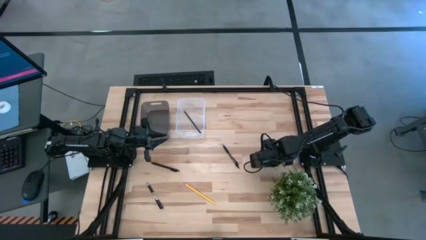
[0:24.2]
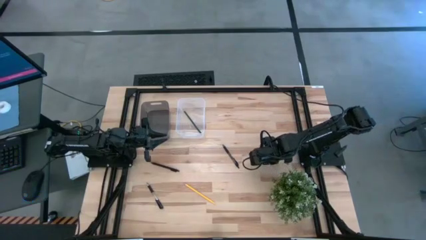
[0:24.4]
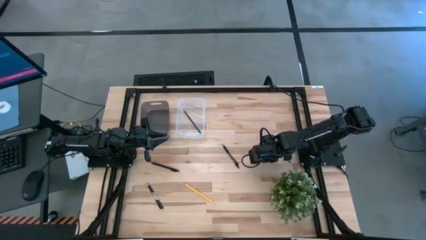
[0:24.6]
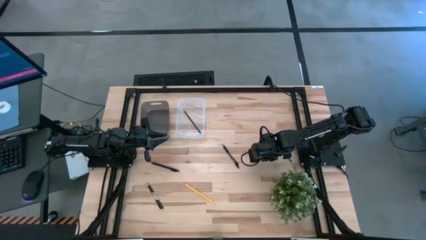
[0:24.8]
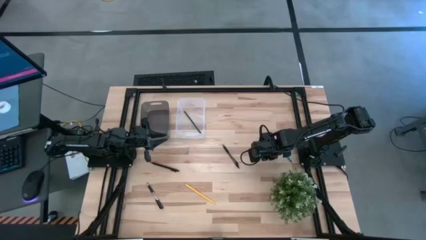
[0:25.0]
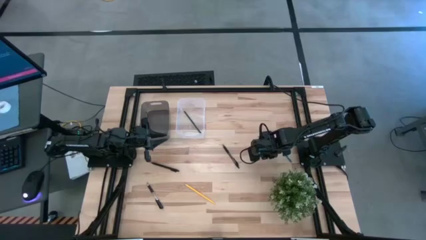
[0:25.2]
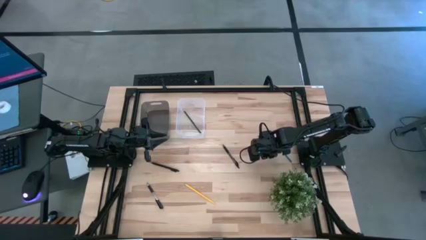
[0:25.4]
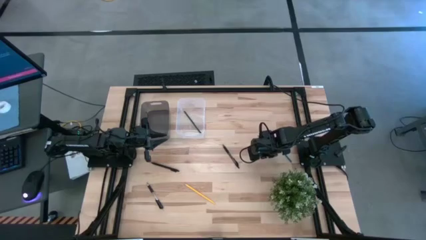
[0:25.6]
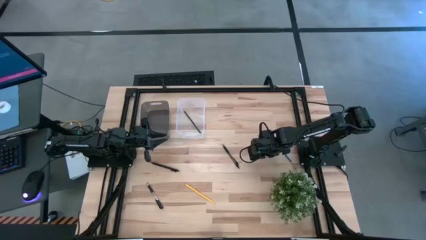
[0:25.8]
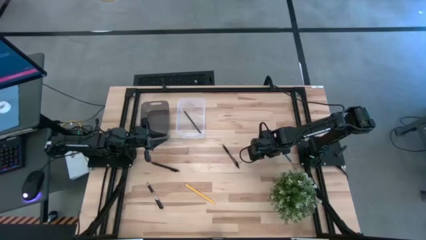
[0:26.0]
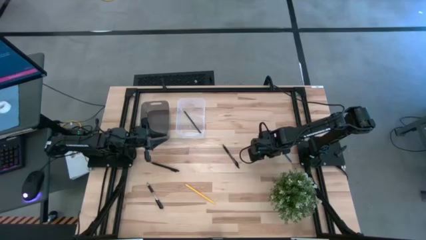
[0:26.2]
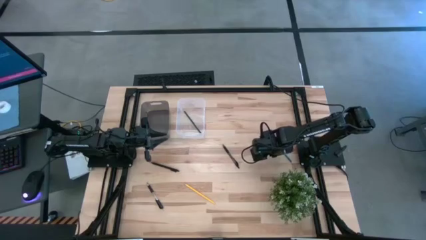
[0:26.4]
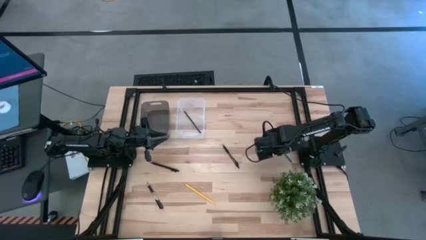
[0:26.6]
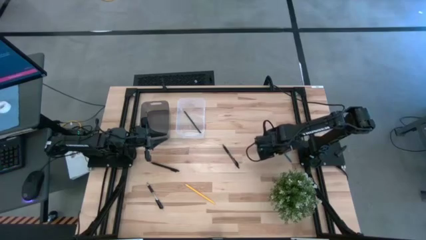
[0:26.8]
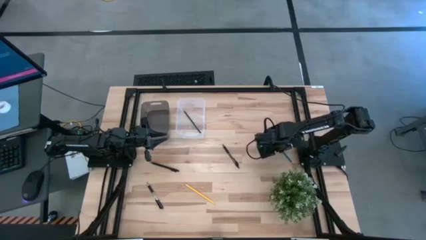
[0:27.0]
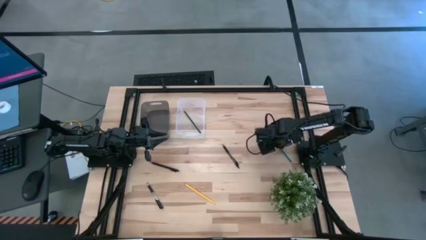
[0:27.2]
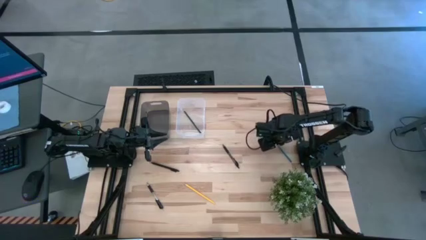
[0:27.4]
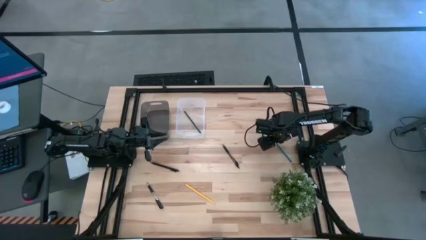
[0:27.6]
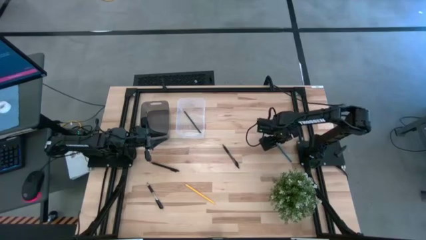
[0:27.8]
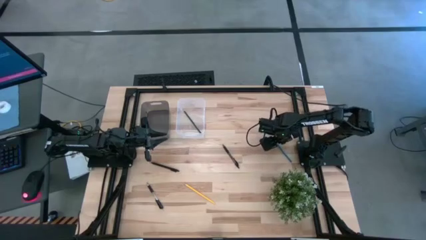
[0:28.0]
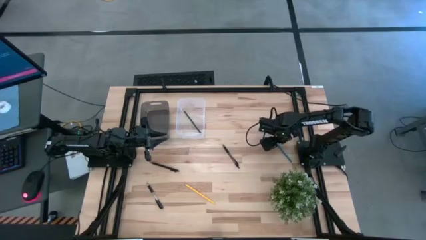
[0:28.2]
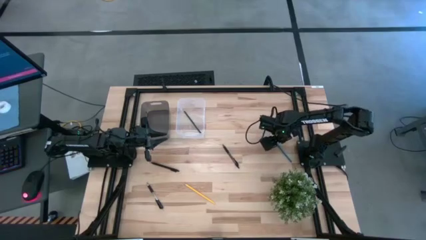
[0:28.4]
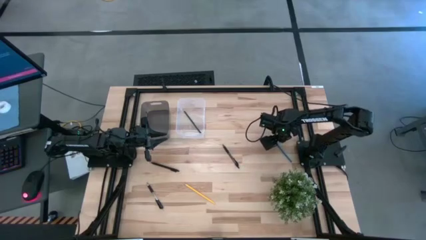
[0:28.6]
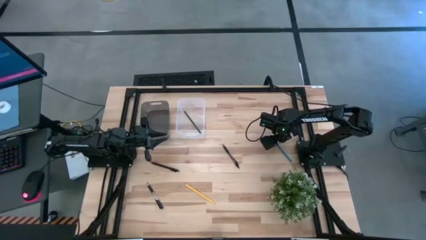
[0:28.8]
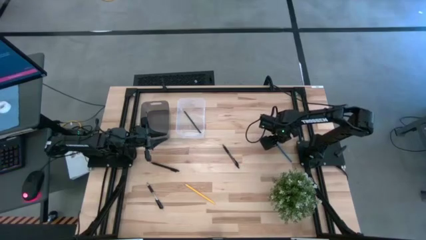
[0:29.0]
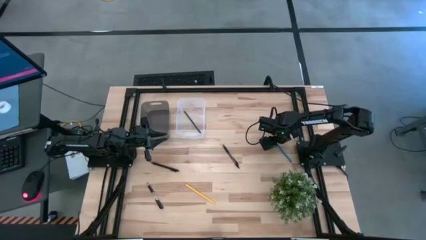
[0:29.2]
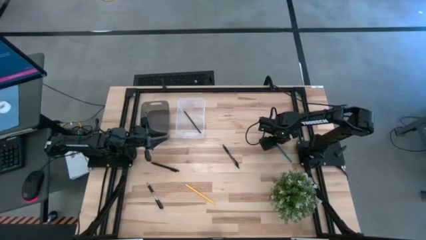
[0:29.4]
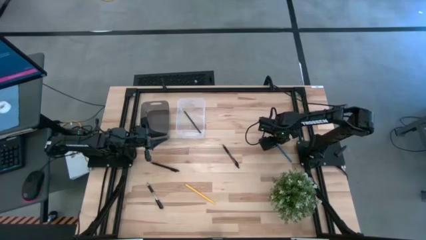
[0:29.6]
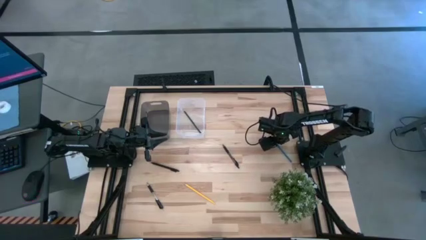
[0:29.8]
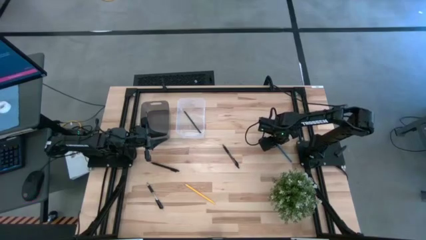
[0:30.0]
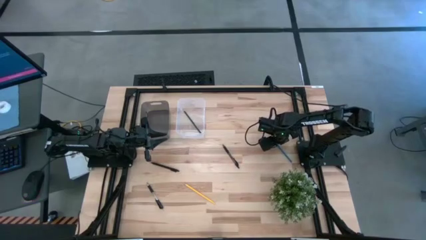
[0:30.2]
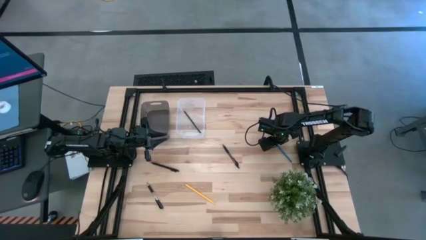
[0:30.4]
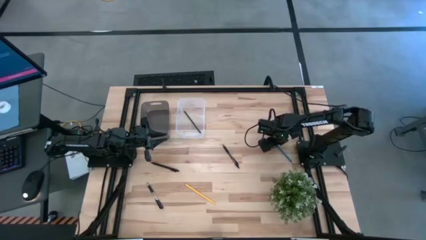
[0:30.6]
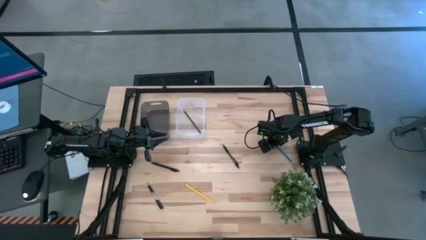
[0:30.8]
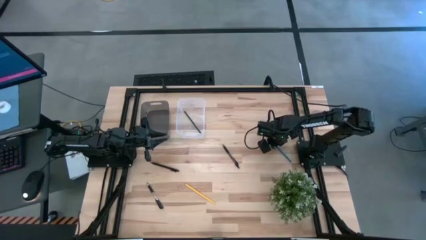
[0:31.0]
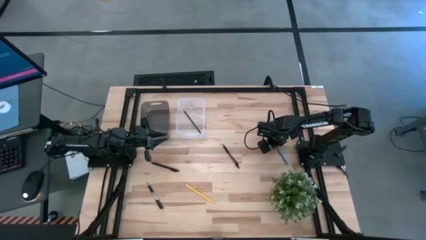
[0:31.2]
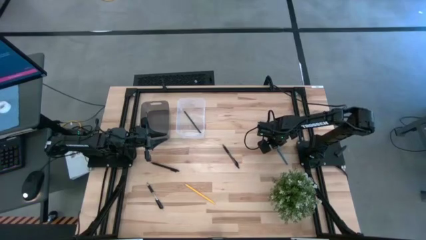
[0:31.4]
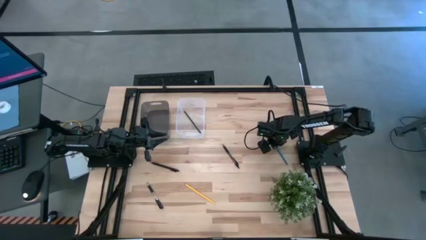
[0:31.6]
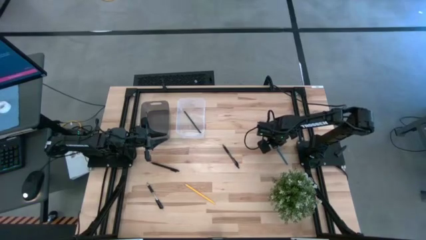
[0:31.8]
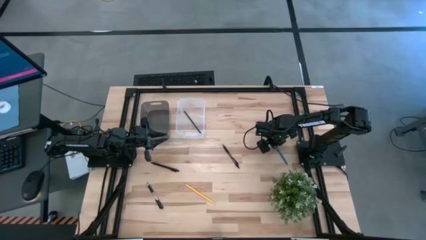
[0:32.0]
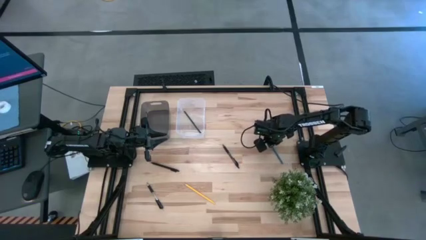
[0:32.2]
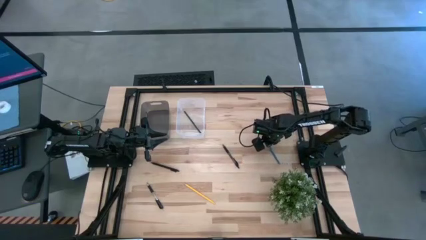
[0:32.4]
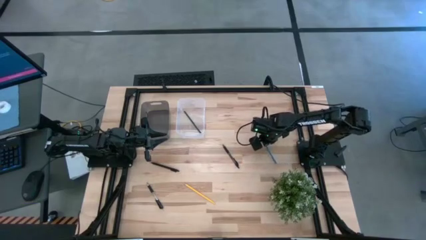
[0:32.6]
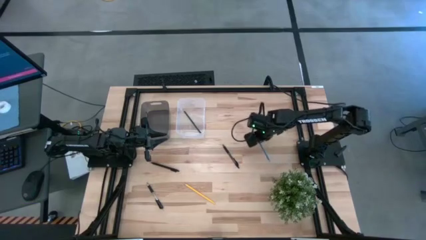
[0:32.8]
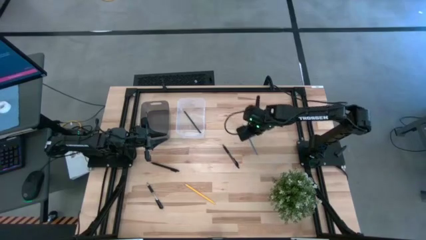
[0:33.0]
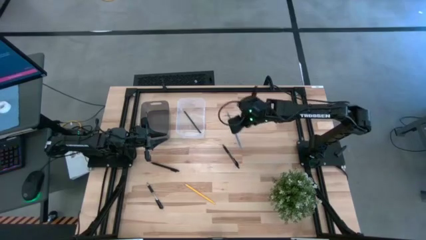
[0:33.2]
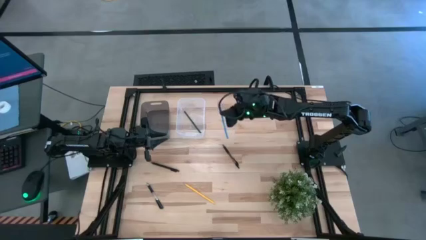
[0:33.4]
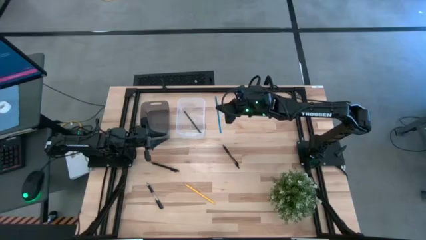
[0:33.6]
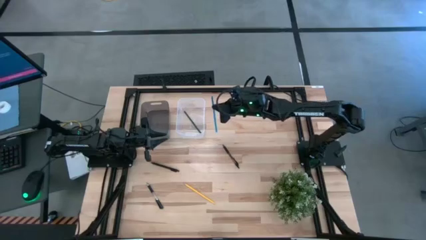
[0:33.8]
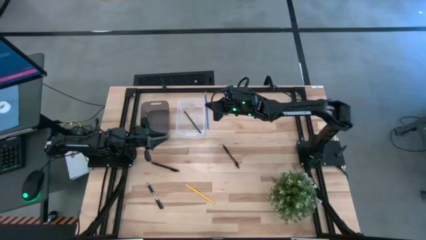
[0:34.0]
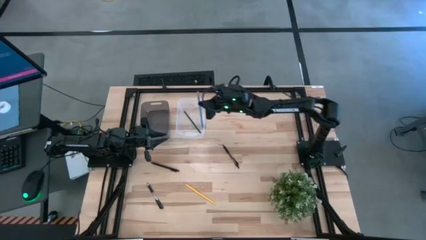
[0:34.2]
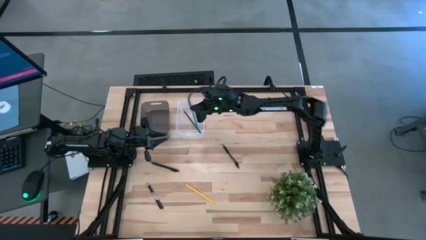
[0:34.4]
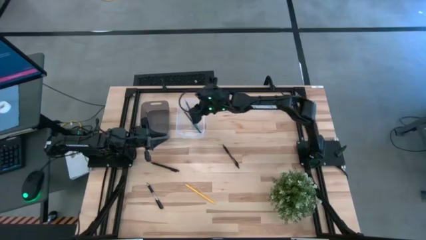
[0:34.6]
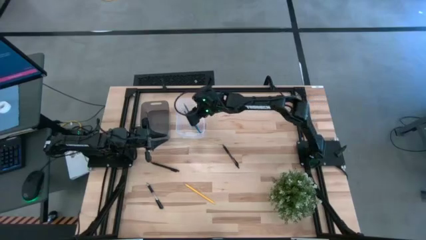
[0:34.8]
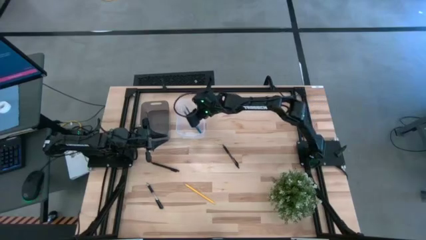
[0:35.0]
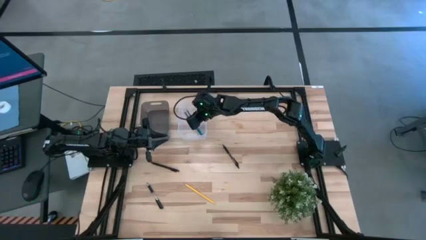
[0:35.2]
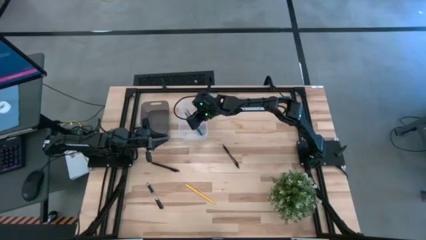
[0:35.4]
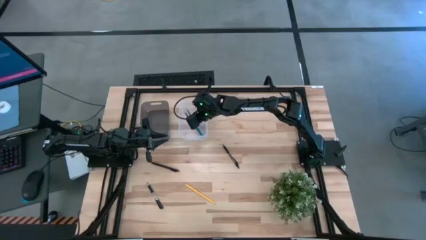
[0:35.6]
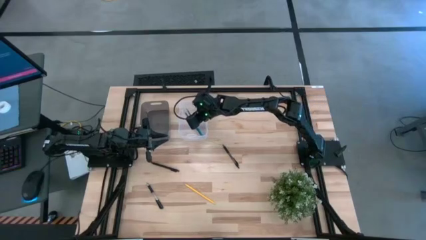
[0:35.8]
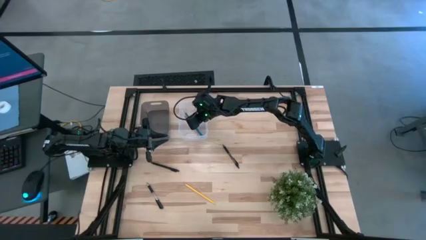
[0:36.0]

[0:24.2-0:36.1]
Task: Sort pens & pencils
Put the blue pencil into the transparent bin

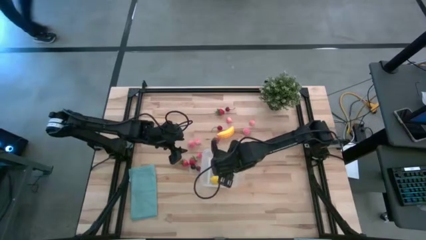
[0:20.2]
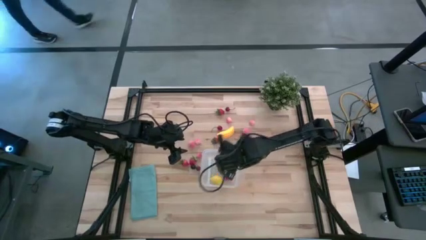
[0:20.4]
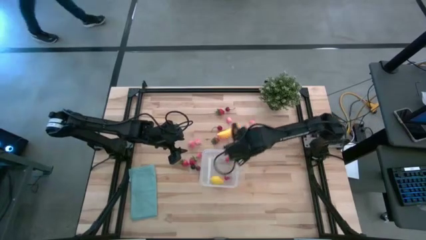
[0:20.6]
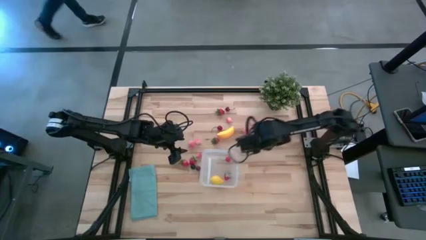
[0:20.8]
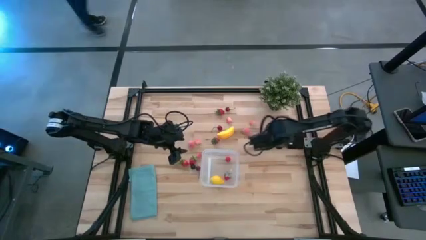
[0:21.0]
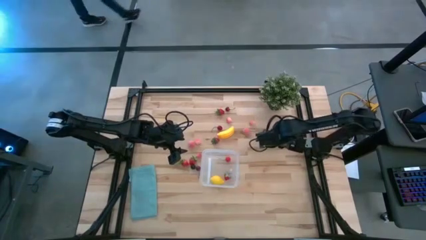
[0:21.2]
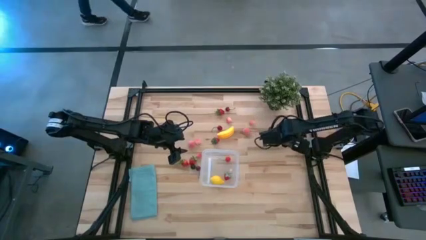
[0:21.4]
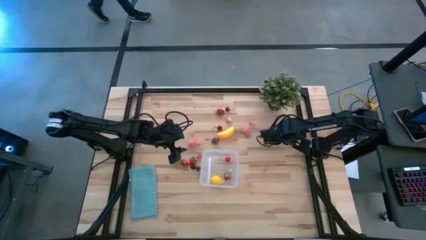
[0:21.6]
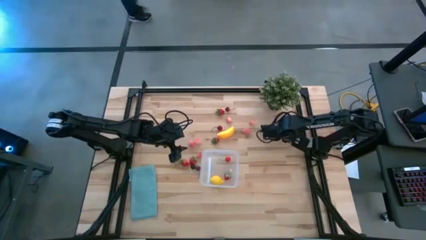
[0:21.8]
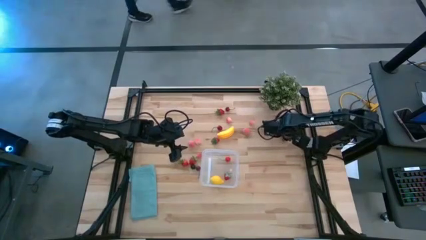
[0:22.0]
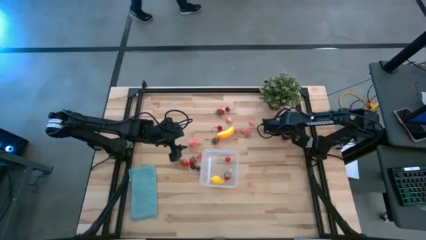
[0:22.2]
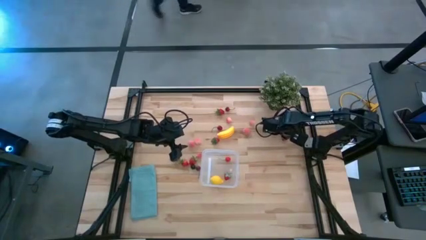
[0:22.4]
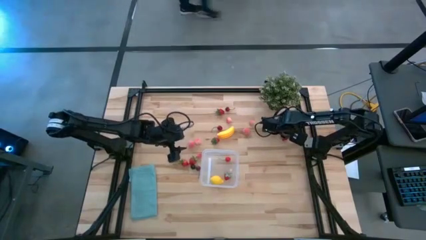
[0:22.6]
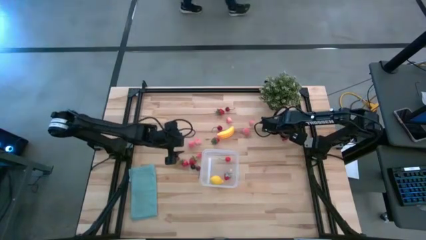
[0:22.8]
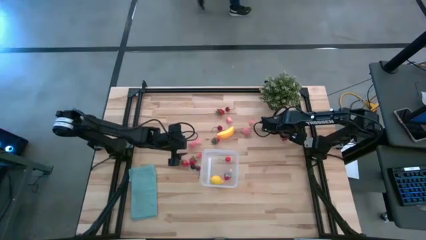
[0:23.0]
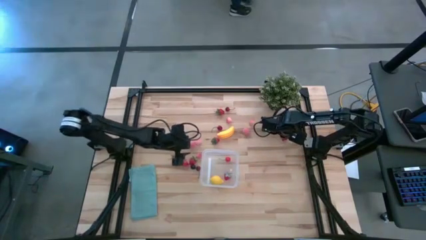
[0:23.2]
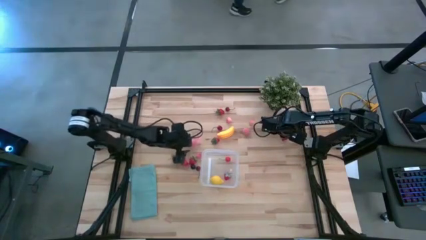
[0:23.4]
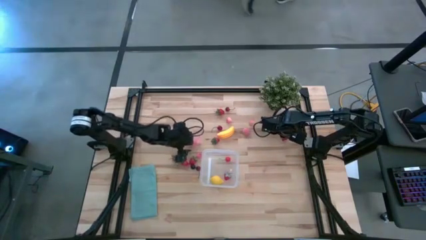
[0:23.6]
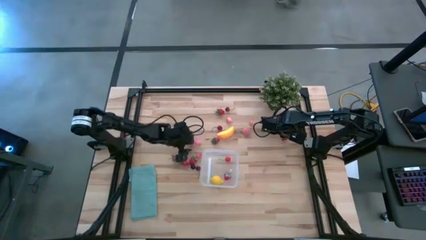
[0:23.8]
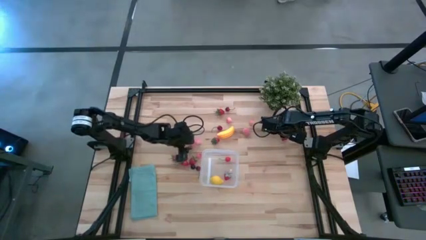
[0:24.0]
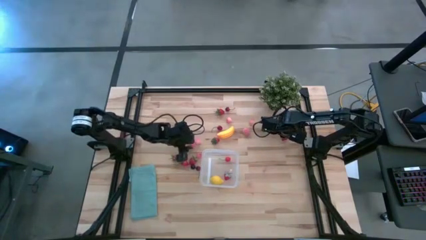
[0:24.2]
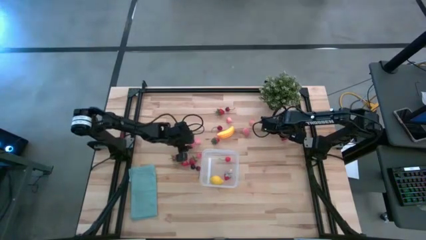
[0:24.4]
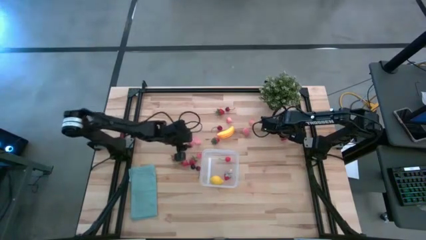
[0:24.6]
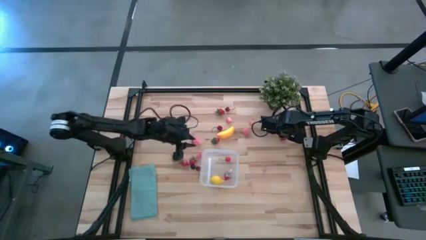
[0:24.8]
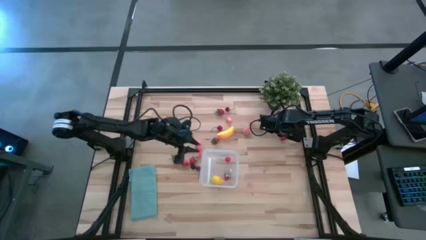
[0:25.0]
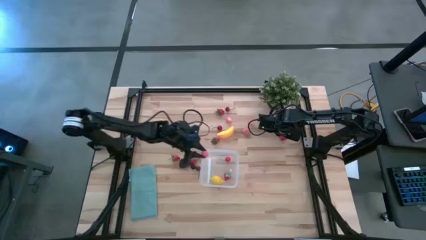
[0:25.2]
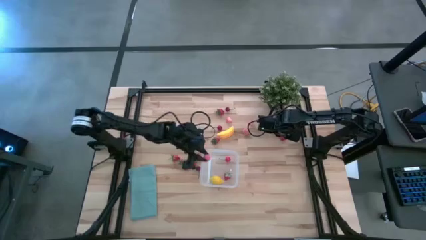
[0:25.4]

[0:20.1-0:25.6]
Task: Pick and placing Produce into tupperware
Put the pink peach into the transparent container
